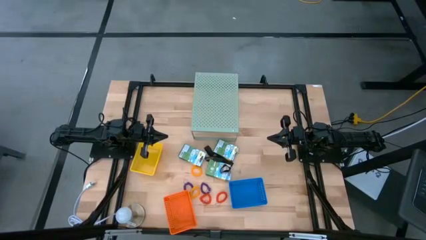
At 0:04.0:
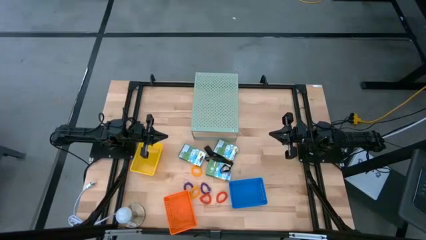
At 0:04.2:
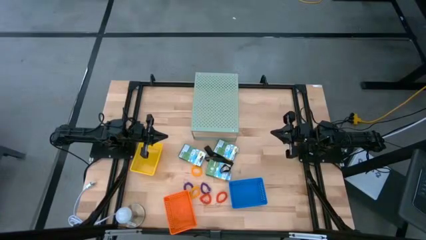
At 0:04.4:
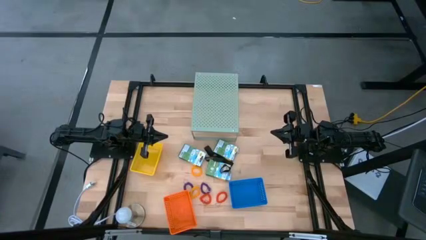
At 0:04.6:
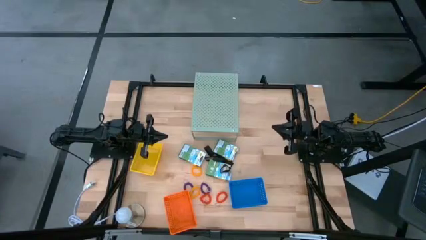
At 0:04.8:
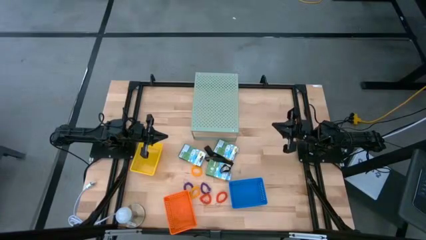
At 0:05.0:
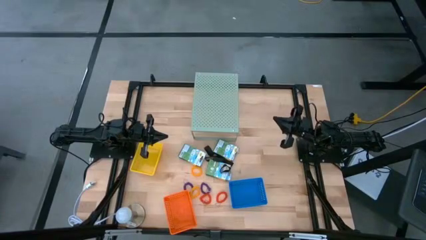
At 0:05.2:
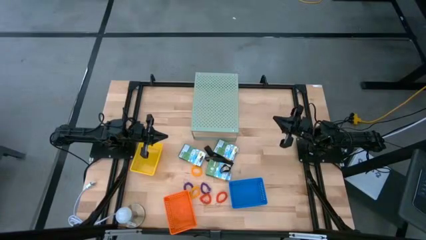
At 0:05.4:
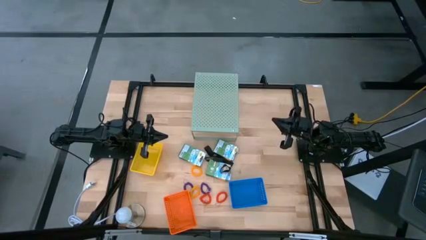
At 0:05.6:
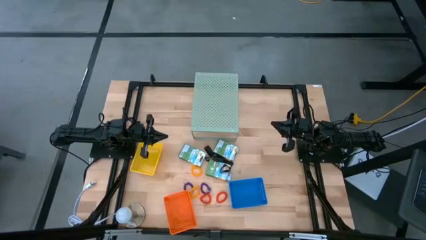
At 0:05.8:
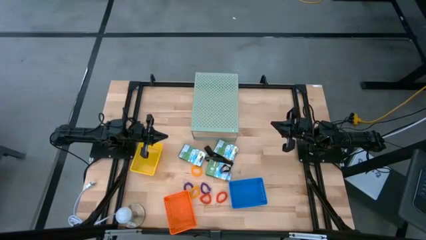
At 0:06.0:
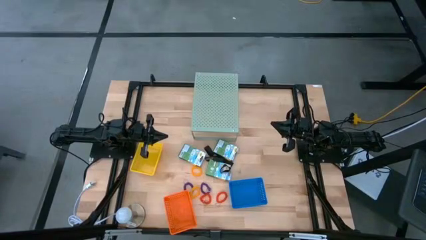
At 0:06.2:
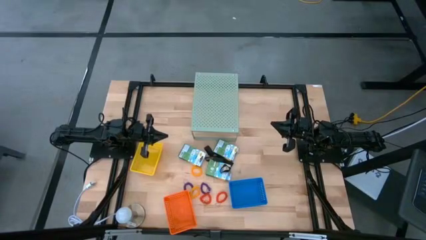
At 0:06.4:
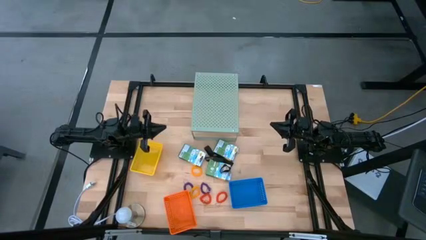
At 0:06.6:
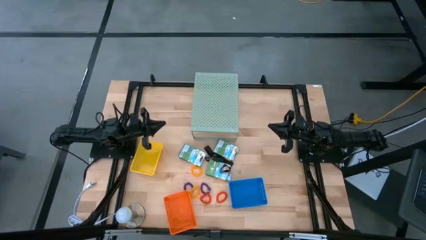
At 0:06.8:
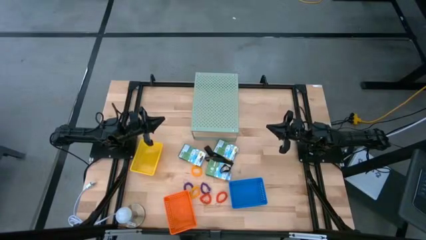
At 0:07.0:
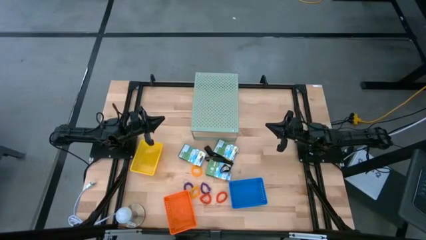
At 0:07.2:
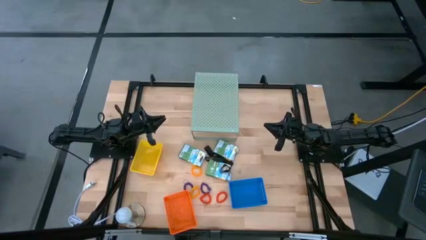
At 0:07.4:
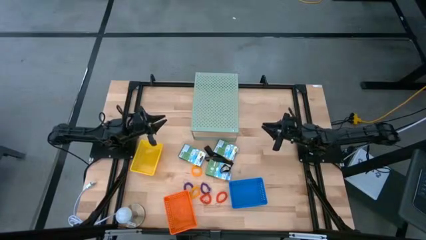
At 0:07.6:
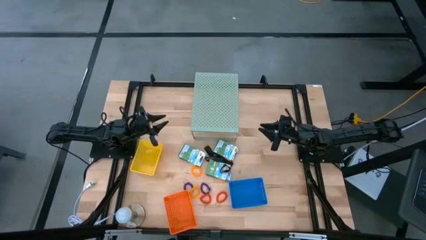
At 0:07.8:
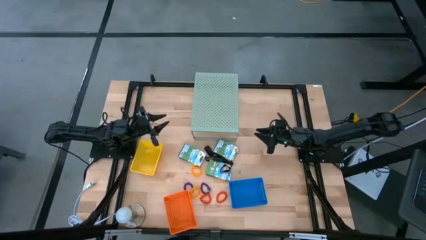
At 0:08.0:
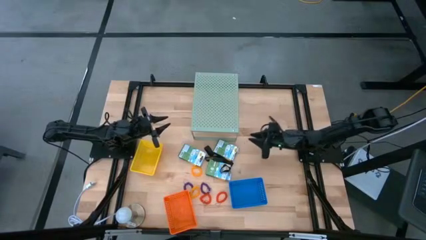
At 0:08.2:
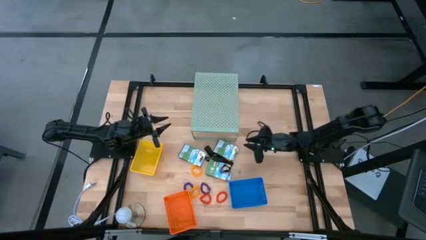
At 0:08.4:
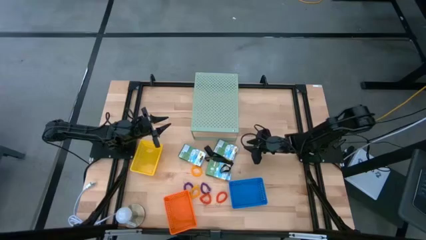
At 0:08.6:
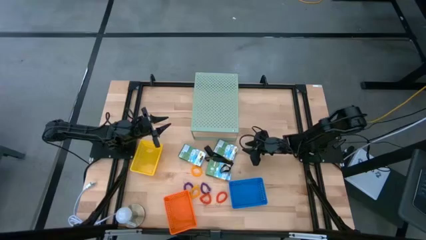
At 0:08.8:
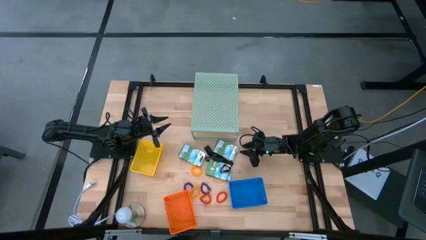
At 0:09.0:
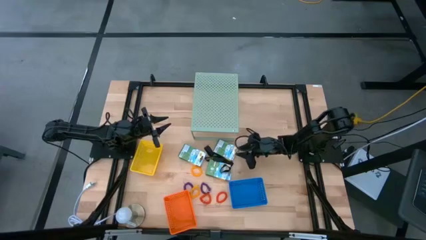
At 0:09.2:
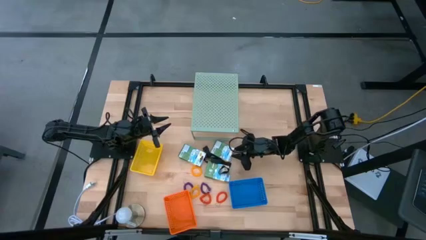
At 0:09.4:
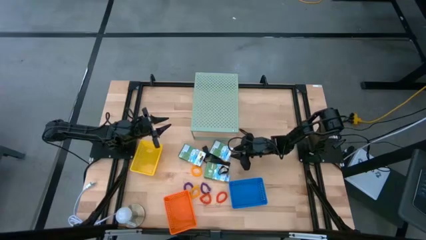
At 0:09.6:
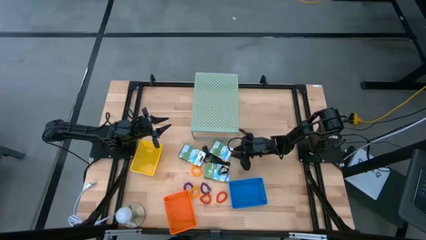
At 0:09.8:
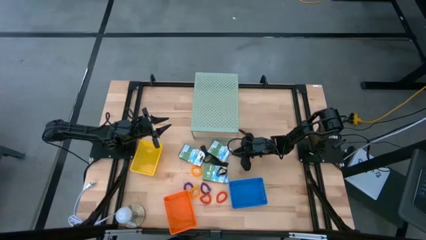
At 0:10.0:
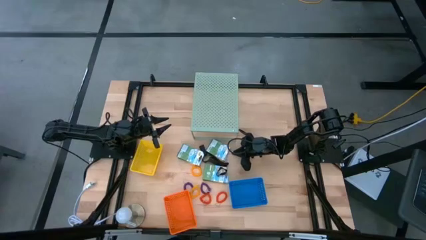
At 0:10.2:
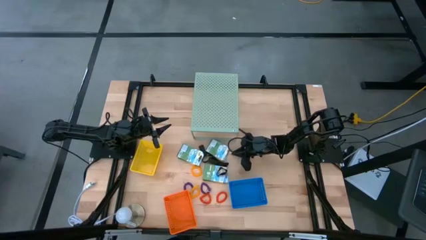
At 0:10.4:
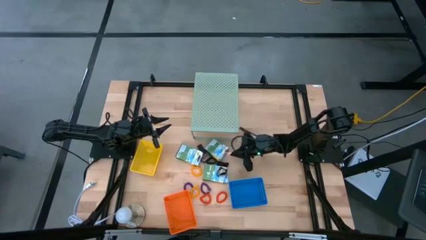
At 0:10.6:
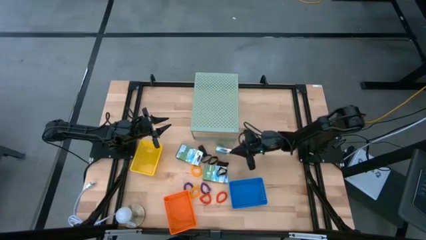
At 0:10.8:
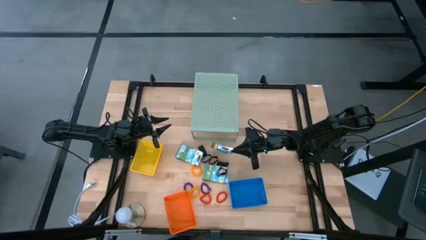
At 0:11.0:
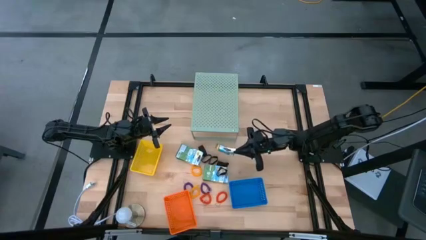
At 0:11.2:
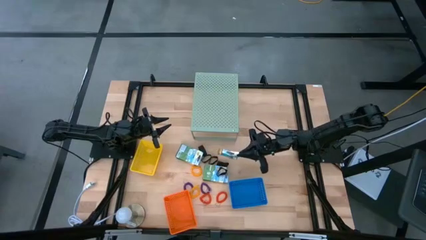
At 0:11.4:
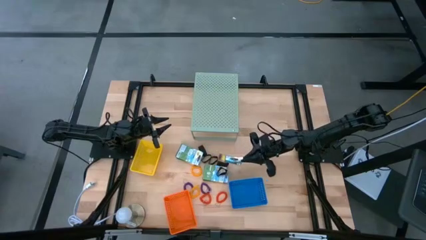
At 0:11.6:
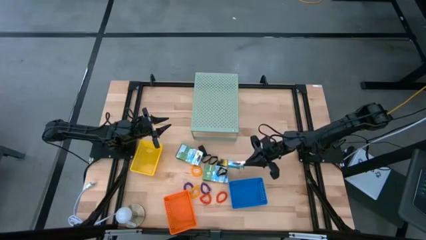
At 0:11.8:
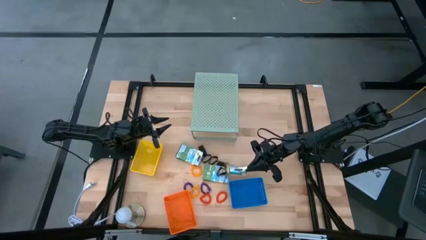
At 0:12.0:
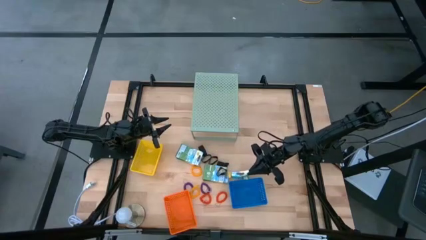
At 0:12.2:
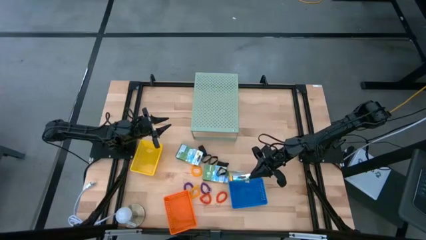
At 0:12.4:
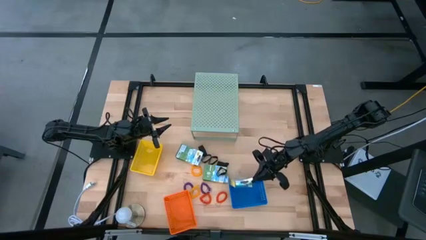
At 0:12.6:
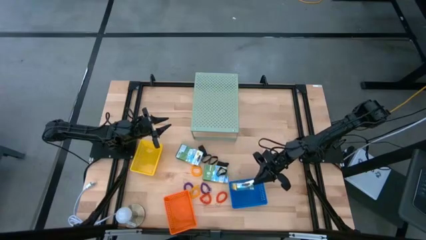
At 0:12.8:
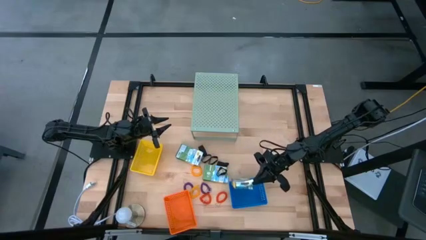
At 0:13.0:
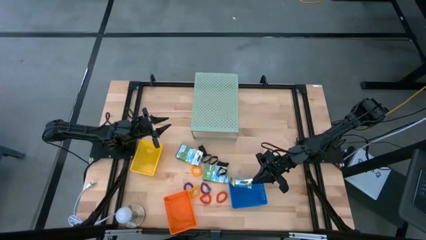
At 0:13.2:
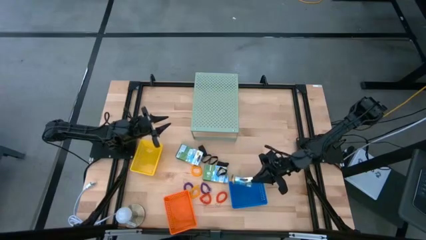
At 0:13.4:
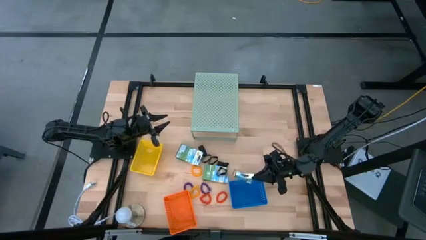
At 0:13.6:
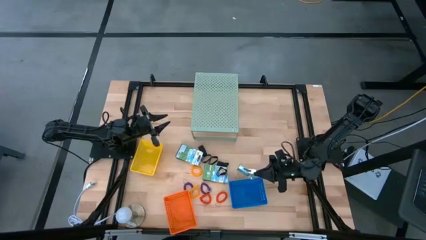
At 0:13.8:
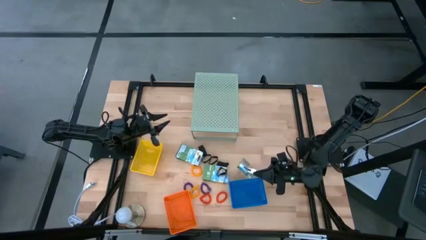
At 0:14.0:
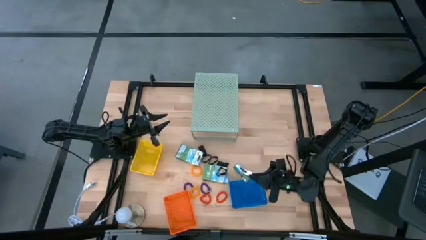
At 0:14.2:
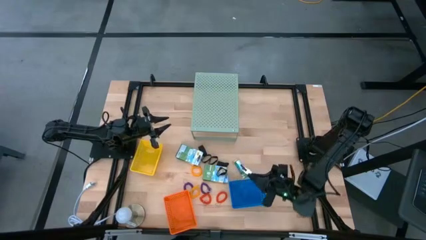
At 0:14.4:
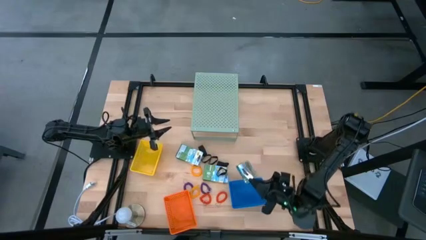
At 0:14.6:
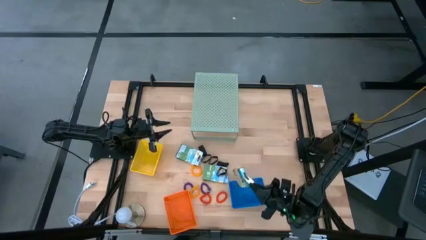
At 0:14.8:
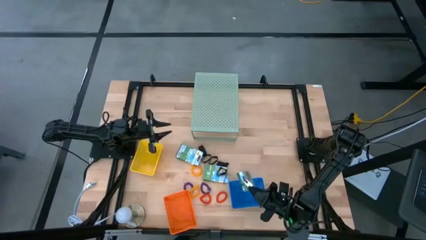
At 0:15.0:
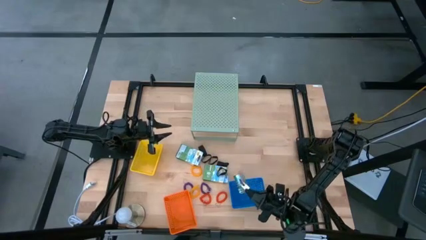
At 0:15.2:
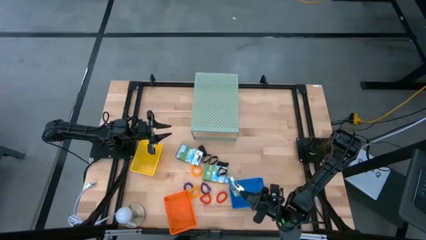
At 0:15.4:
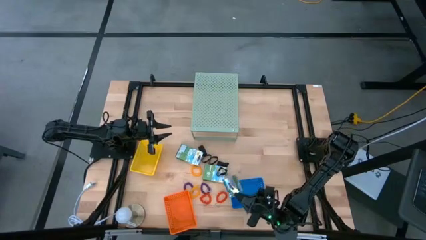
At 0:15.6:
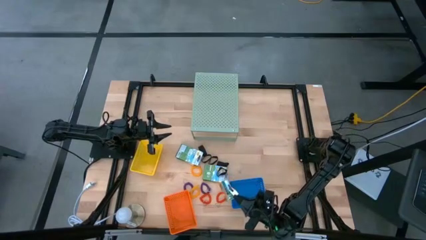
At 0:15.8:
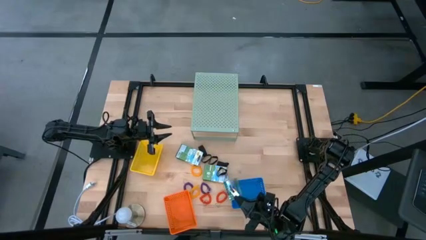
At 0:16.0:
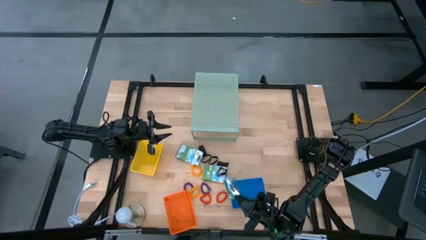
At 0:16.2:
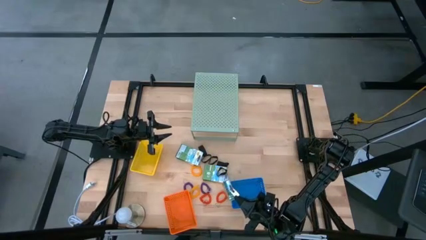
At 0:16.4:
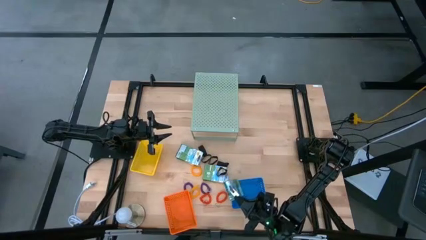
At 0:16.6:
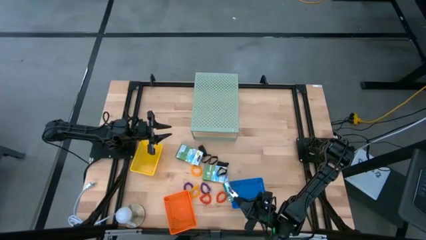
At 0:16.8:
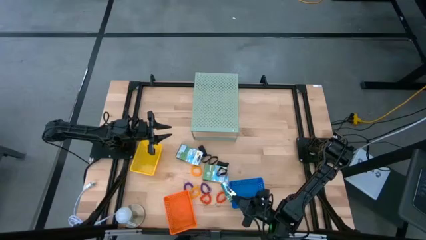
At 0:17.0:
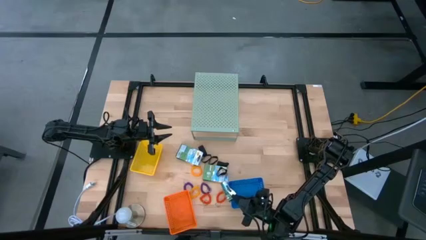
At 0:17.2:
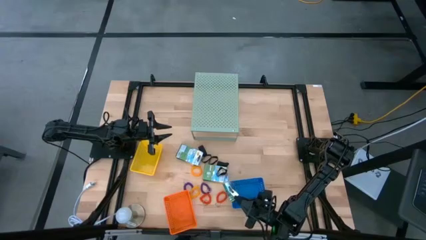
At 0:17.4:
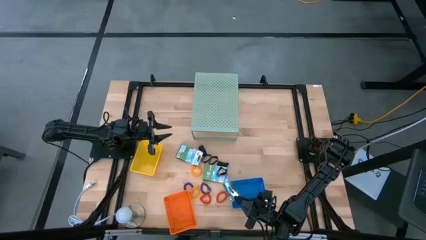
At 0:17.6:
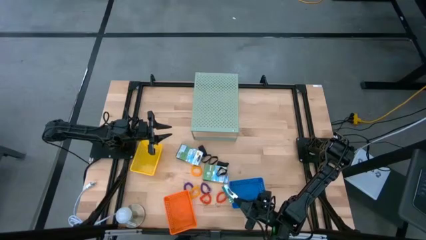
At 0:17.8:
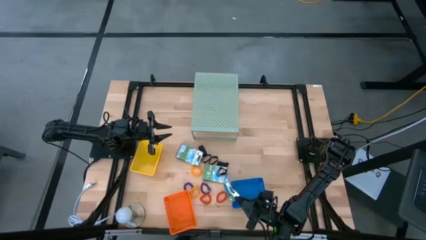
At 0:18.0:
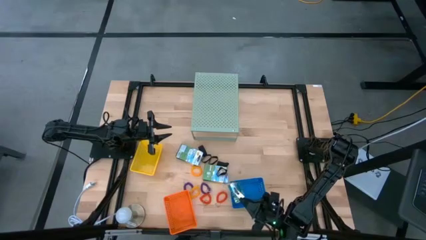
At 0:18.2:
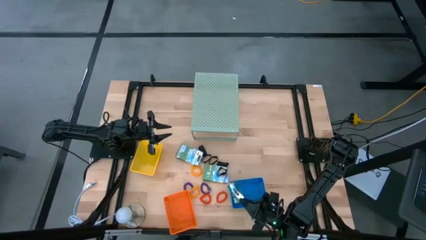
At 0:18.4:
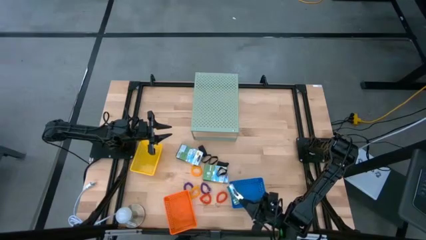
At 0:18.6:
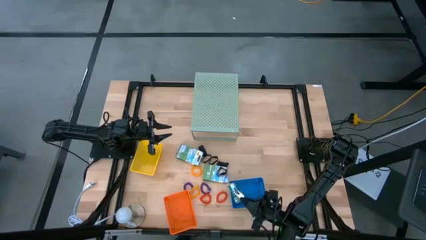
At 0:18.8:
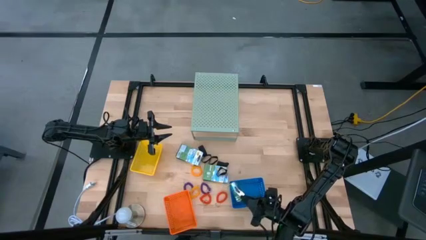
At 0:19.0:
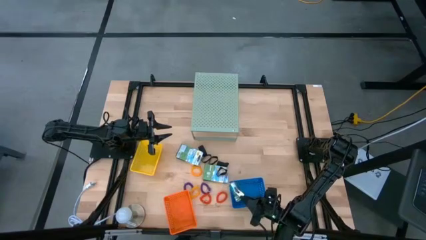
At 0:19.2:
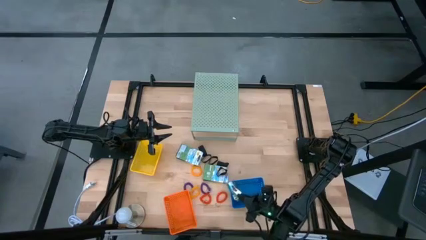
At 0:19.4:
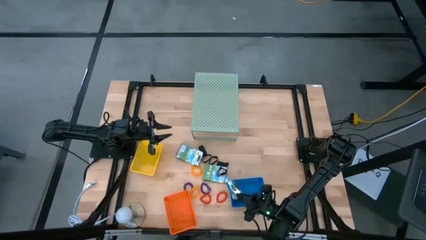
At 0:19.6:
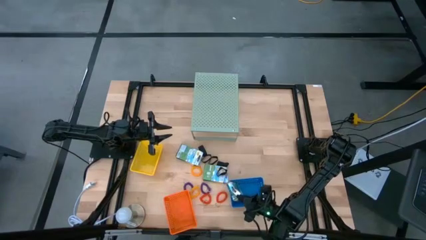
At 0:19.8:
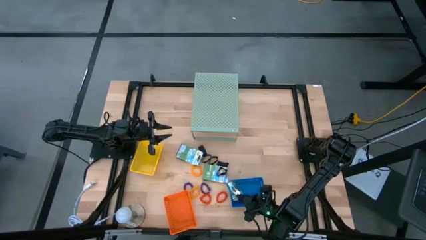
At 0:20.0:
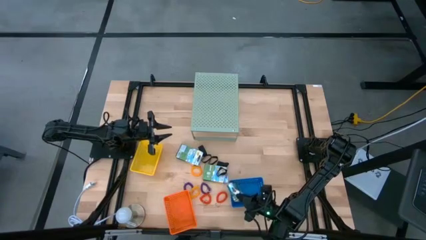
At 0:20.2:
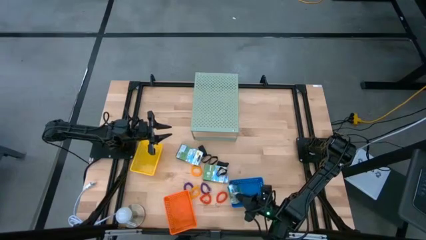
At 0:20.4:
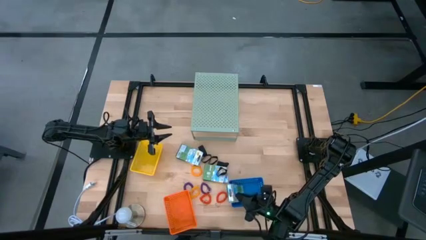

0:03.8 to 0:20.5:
Task: Pick & Place Office Desk Supplies
Put the crayon box into the blue bin
